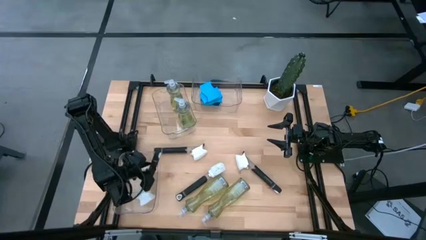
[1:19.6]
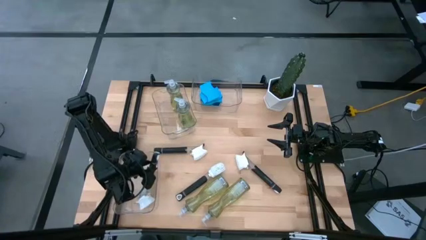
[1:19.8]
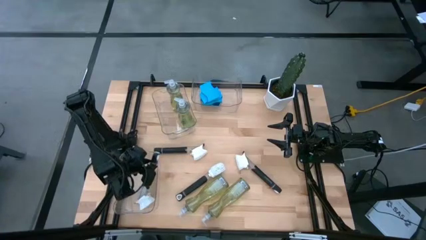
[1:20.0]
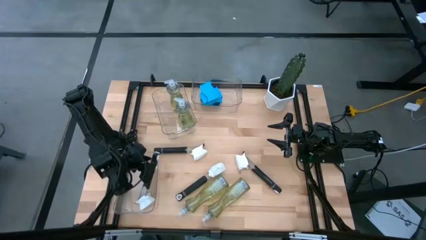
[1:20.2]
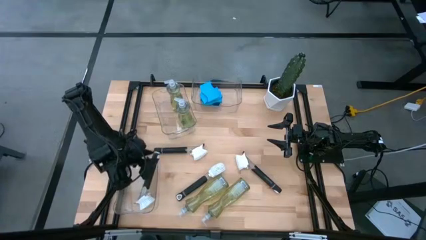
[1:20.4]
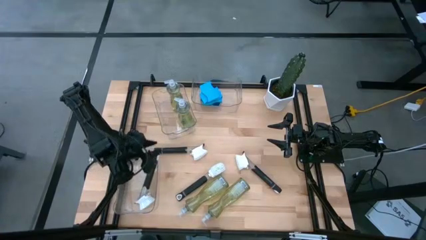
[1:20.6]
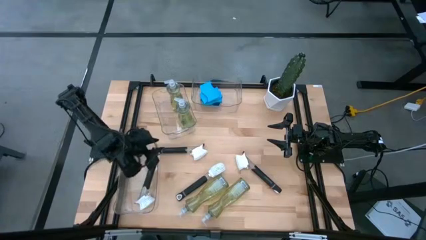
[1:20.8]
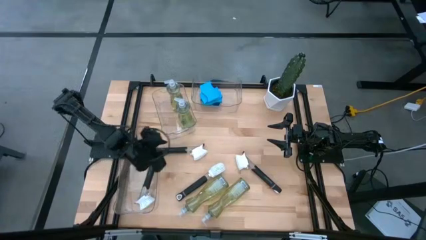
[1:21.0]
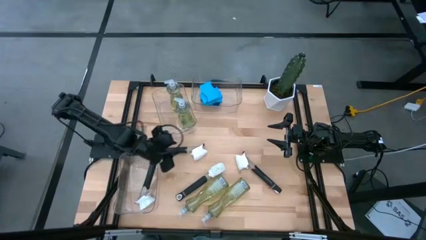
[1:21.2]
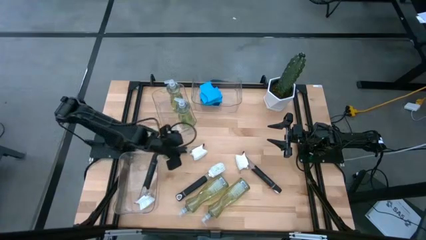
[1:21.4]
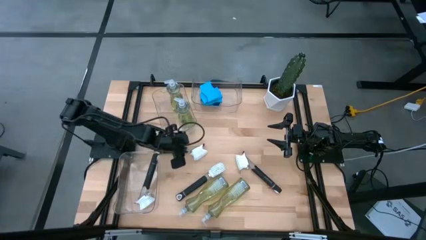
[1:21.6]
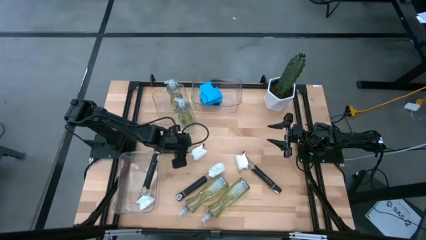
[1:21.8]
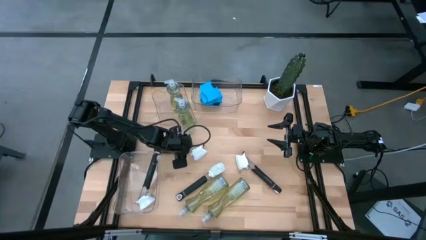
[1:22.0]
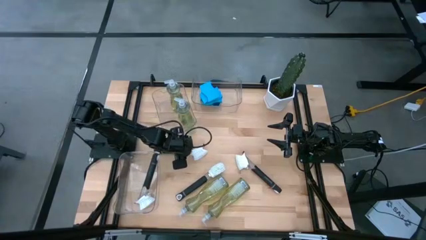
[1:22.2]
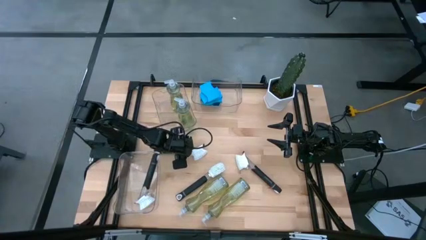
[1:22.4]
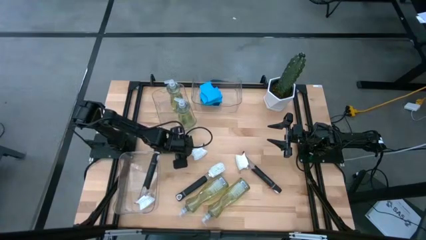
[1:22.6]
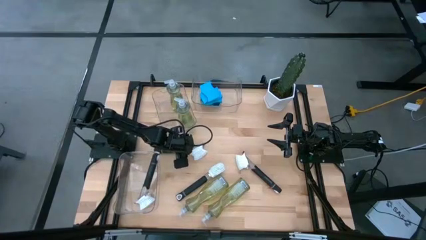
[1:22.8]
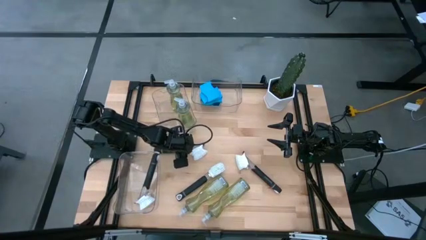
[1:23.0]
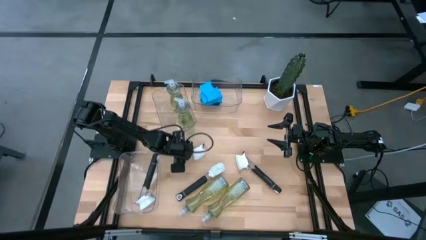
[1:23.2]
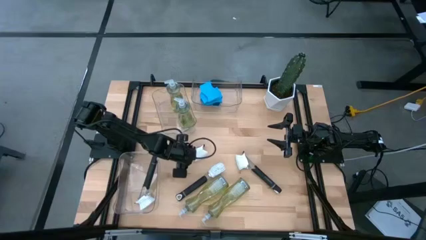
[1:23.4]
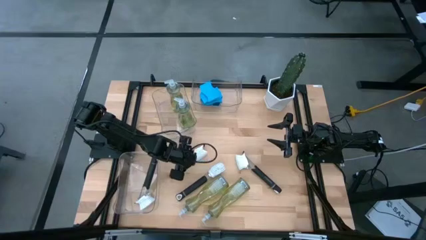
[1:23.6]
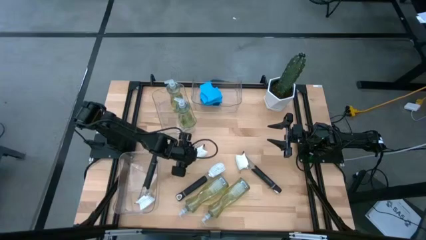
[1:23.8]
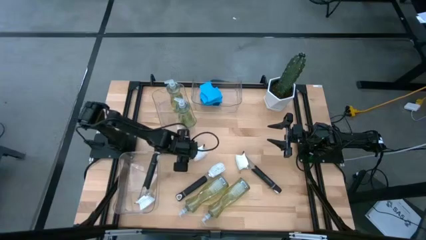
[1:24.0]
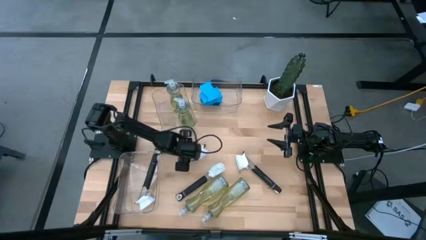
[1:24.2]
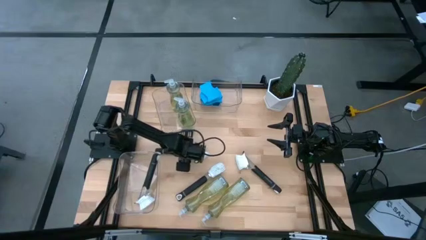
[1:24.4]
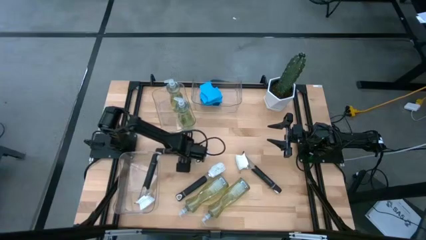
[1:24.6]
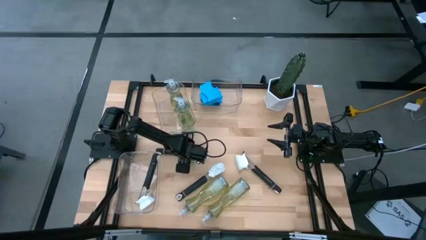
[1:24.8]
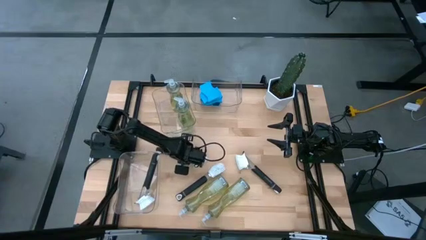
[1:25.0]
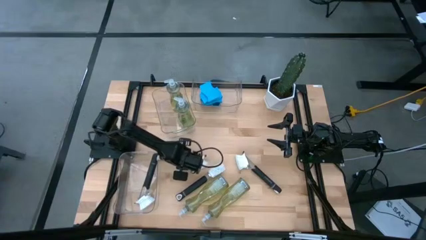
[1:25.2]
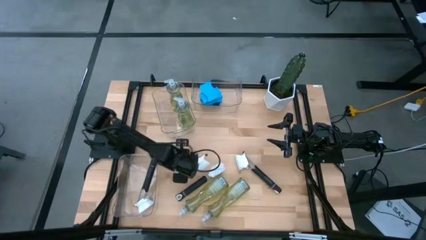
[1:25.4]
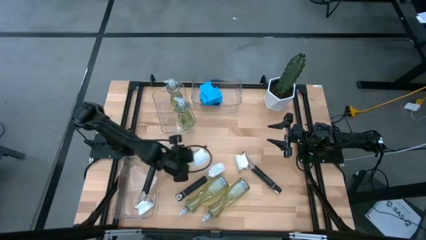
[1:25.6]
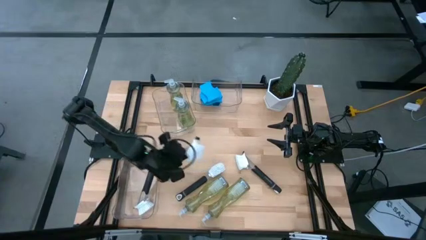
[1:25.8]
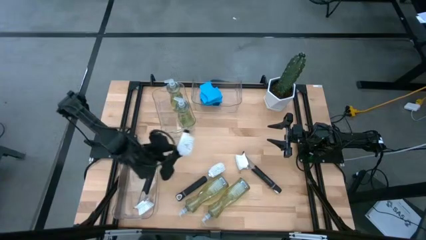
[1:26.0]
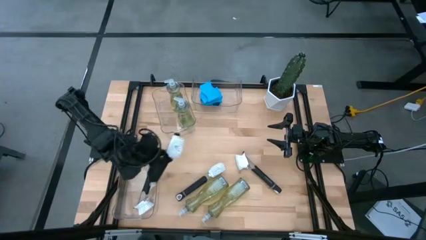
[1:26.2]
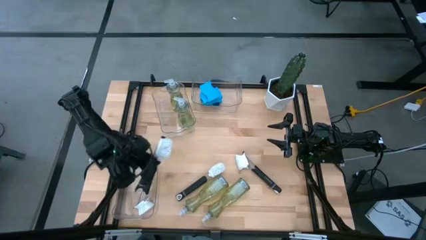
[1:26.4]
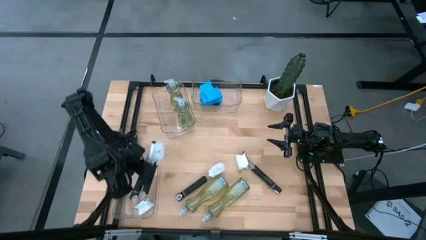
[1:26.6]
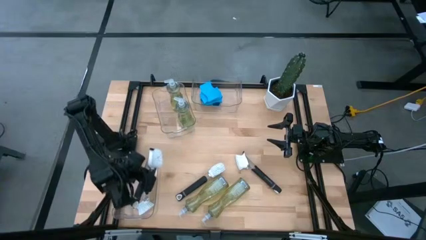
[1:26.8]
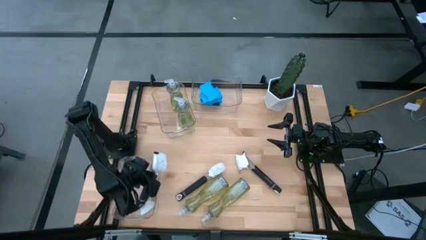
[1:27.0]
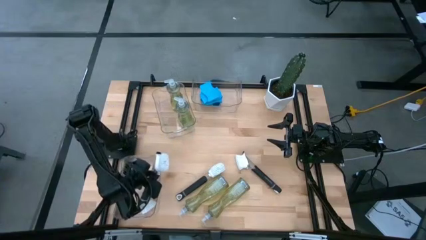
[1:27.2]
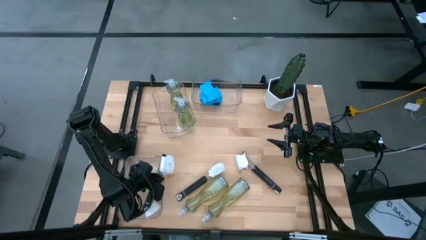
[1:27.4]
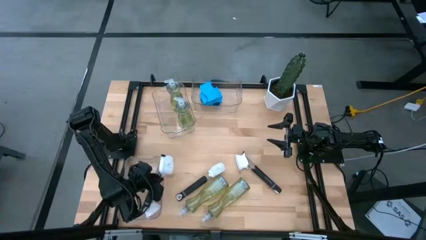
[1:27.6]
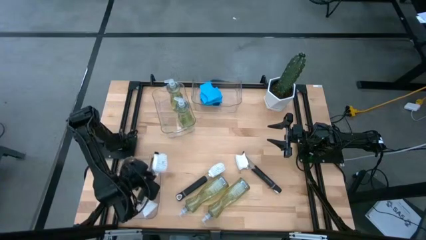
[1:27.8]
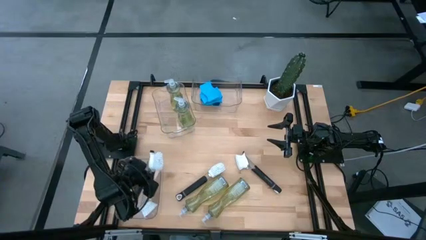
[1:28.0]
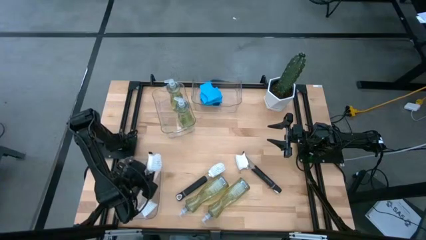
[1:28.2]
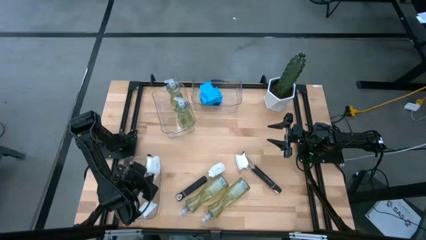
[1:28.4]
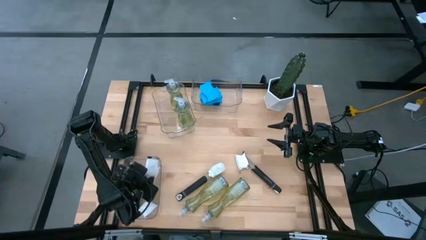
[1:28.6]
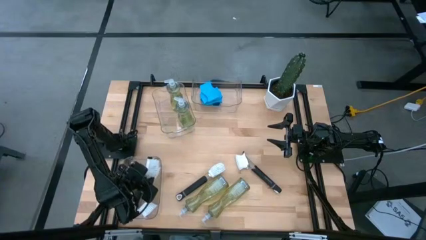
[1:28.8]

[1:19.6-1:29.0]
Task: Pick & Place Kitchen Sink Supplies
Put the dish brush into the bottom transparent bin

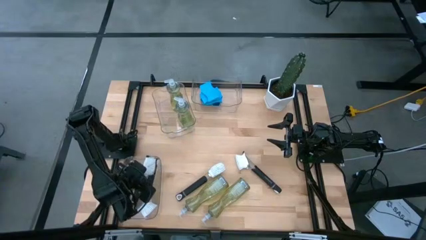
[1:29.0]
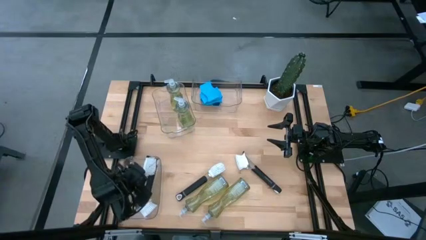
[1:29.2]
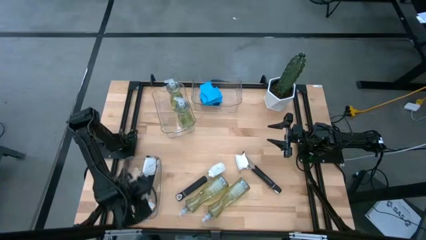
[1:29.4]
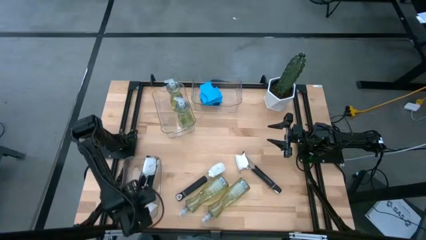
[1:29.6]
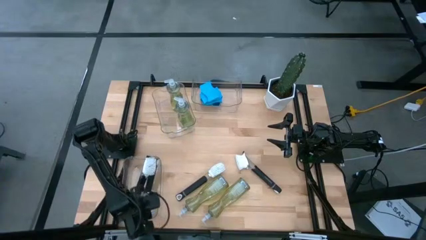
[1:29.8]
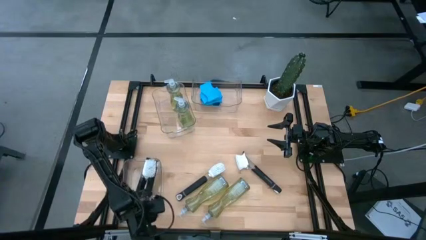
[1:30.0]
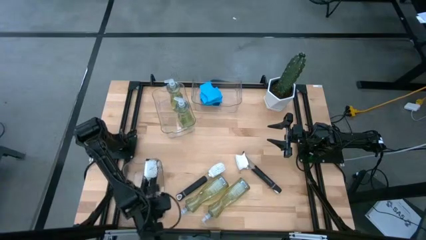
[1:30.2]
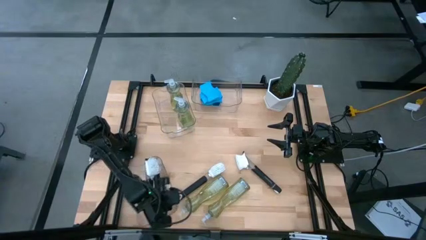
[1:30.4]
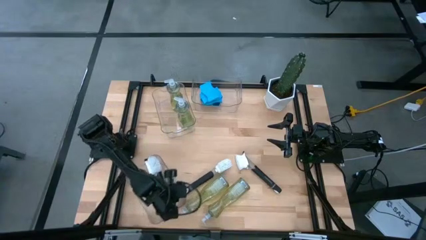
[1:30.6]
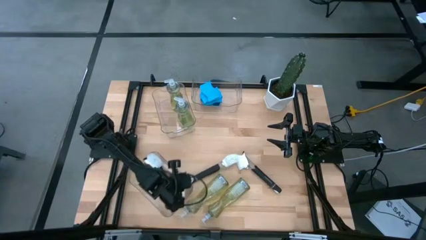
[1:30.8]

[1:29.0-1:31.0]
Adjust the bottom transparent bin on the table

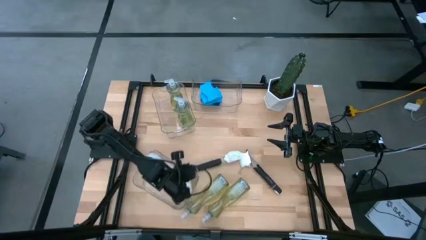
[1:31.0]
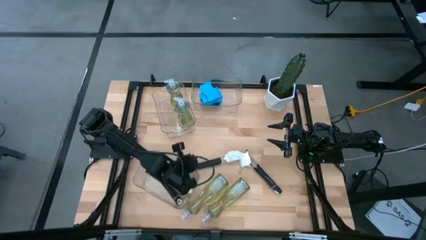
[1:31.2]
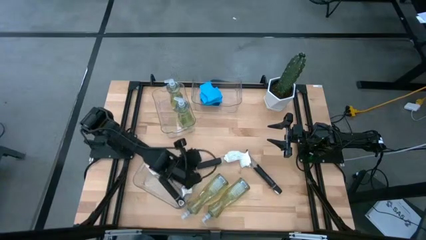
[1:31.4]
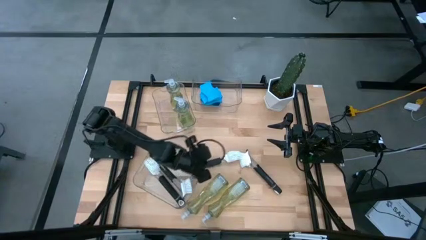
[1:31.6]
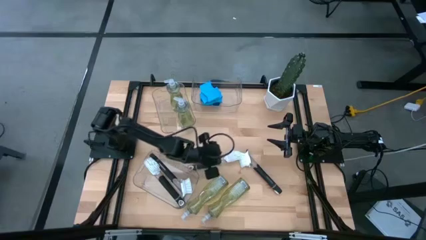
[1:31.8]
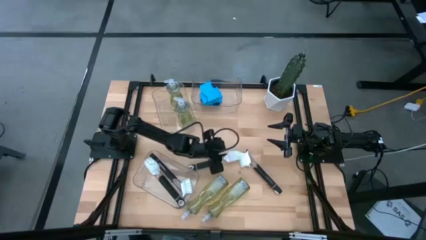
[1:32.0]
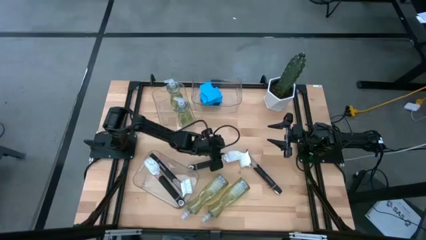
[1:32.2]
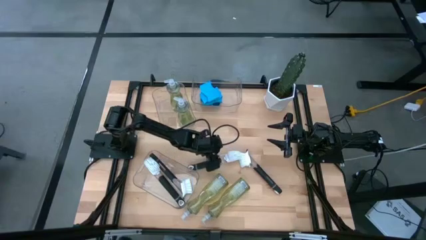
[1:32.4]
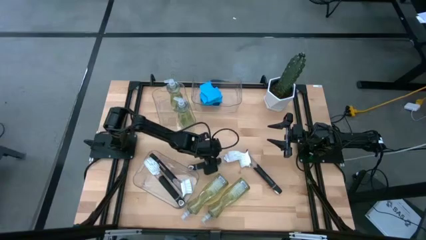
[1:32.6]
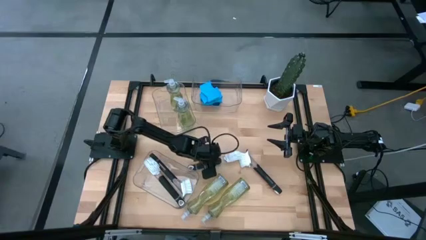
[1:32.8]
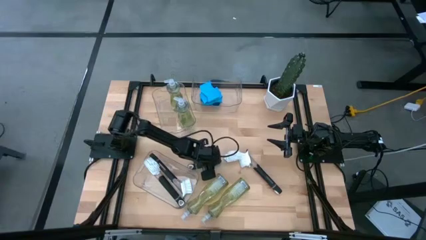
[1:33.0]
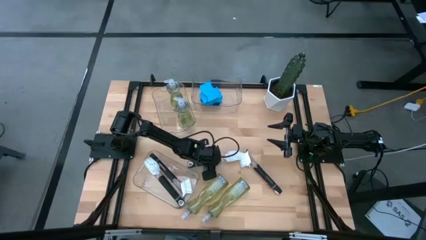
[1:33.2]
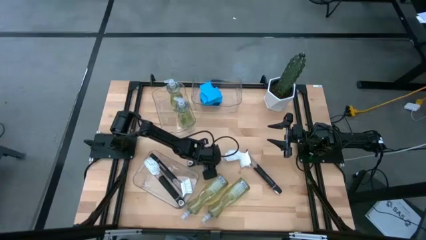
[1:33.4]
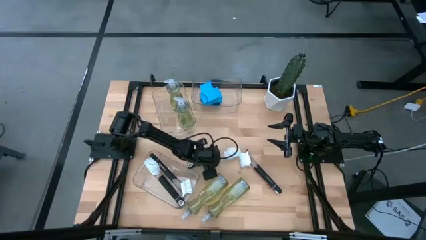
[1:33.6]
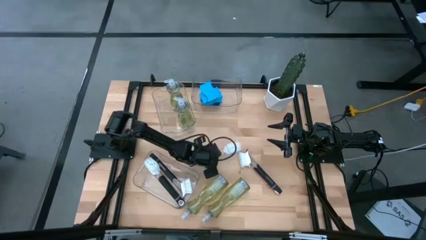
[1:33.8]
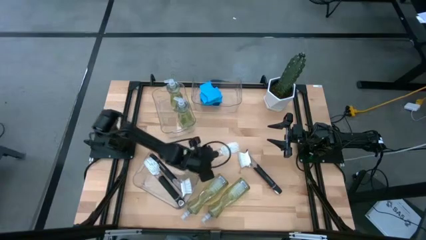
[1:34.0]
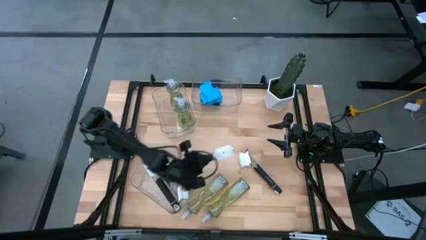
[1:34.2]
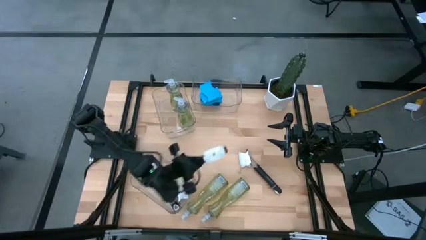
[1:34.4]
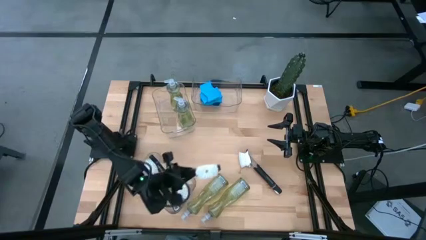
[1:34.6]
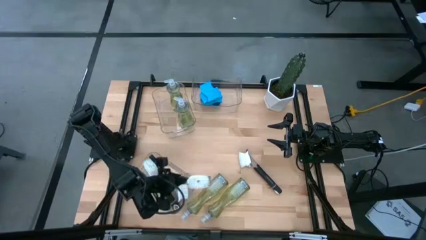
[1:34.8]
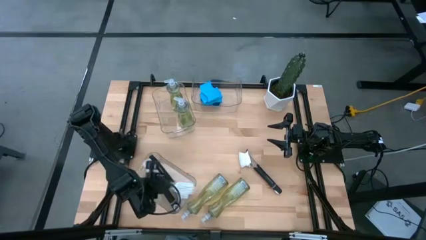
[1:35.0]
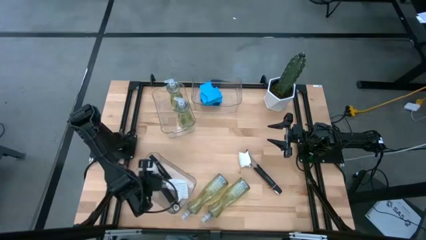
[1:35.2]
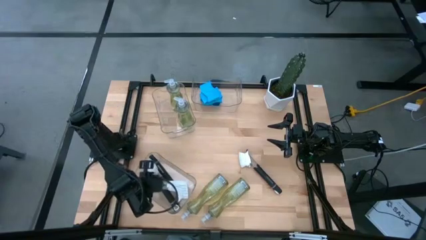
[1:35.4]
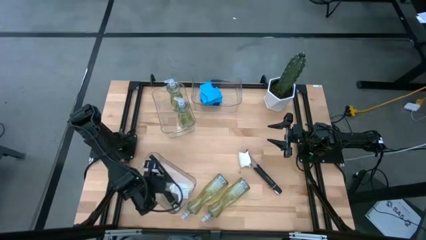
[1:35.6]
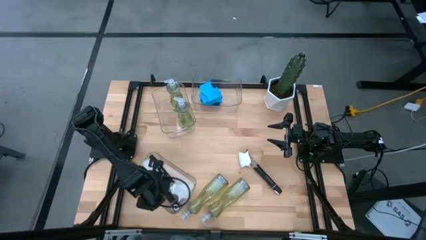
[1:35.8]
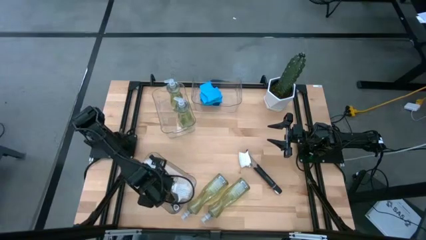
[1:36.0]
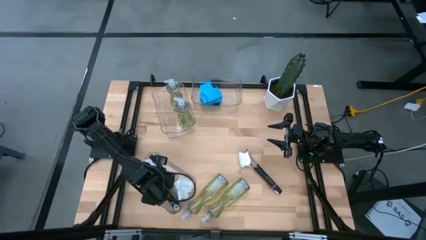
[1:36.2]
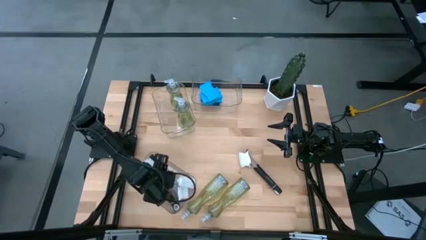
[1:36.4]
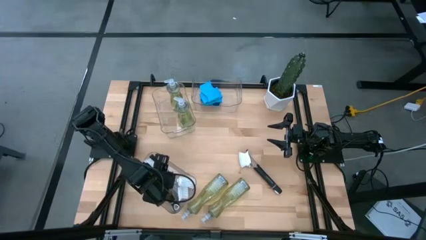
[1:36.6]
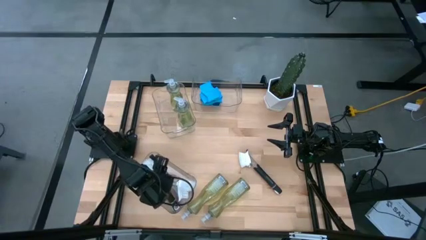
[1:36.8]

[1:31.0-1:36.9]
Put the dish brush into the bottom transparent bin
